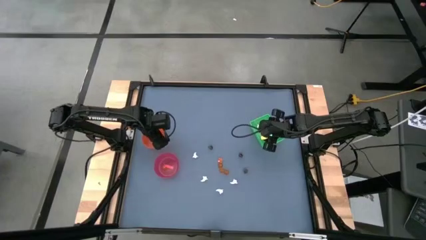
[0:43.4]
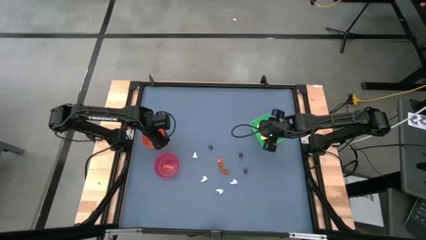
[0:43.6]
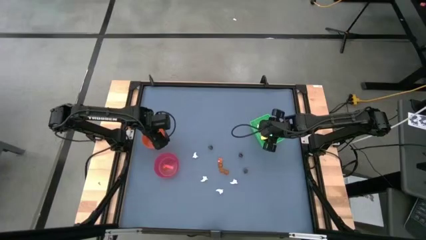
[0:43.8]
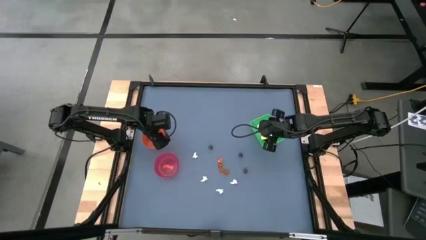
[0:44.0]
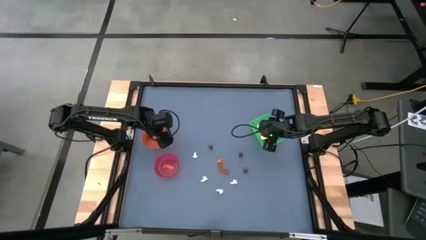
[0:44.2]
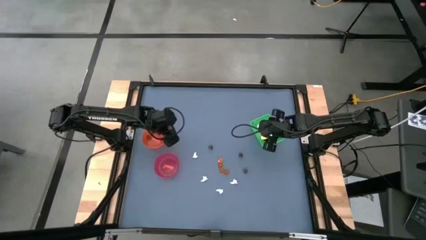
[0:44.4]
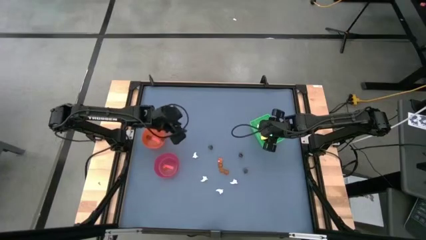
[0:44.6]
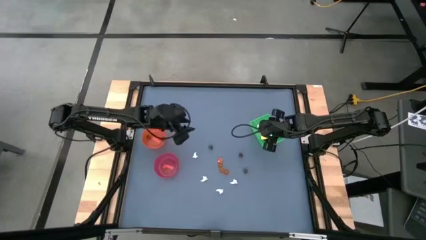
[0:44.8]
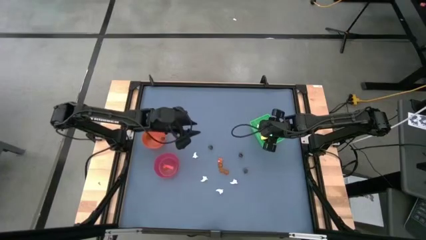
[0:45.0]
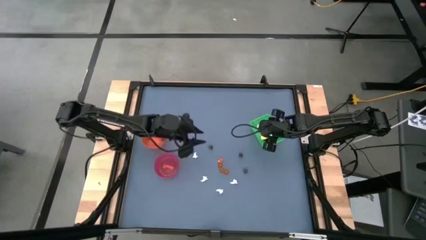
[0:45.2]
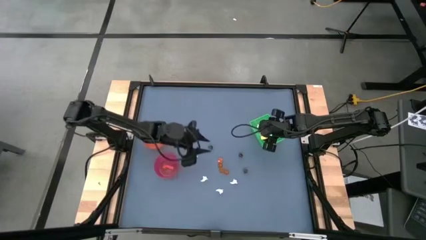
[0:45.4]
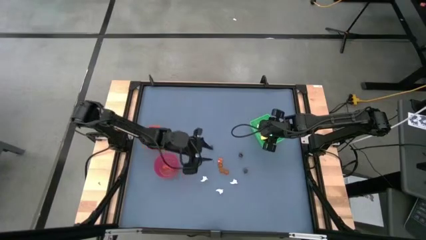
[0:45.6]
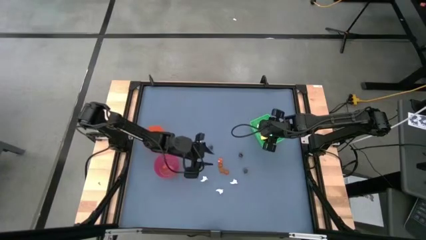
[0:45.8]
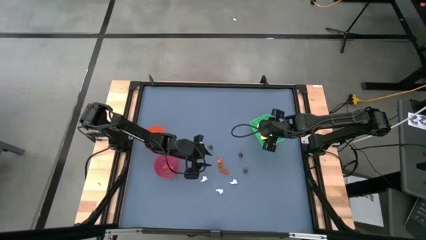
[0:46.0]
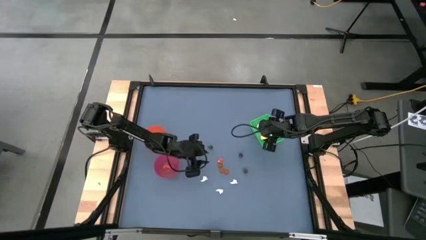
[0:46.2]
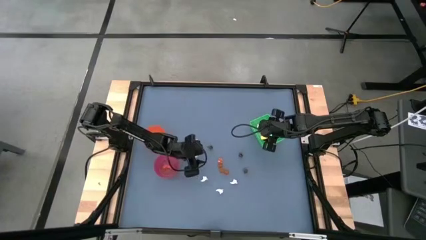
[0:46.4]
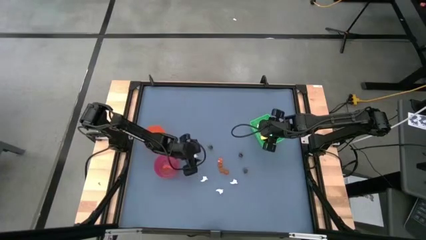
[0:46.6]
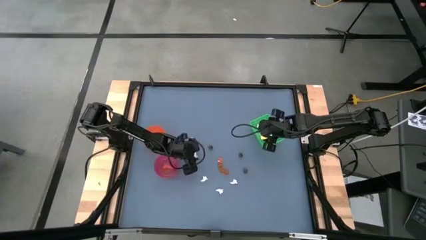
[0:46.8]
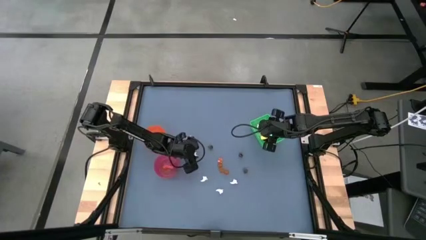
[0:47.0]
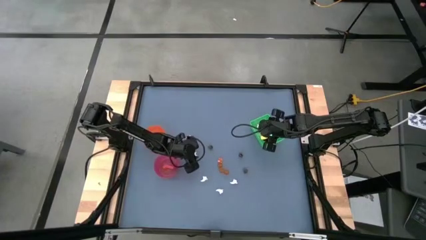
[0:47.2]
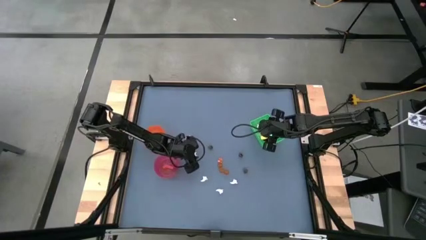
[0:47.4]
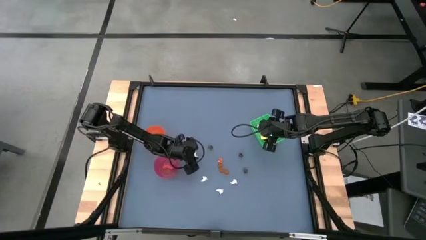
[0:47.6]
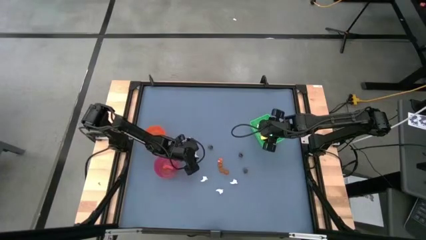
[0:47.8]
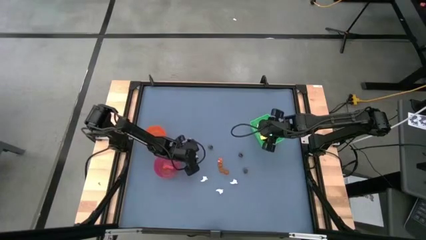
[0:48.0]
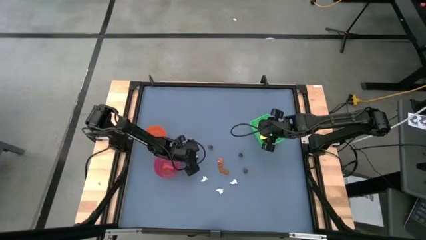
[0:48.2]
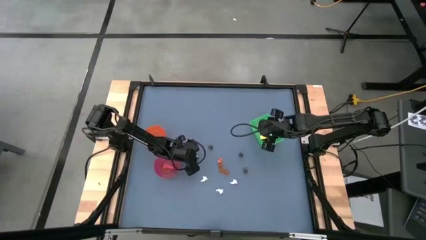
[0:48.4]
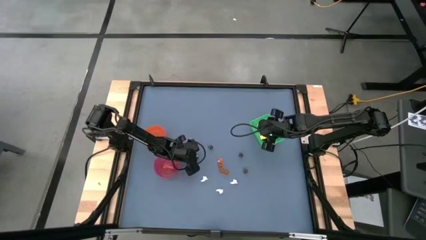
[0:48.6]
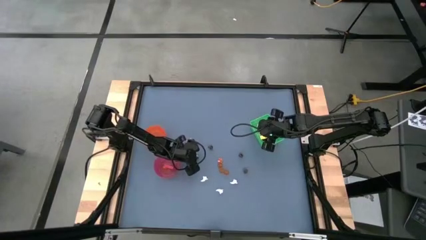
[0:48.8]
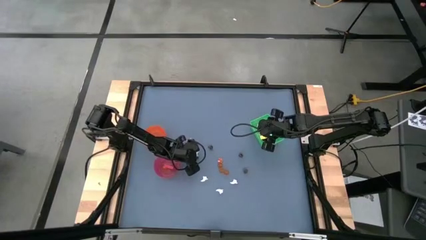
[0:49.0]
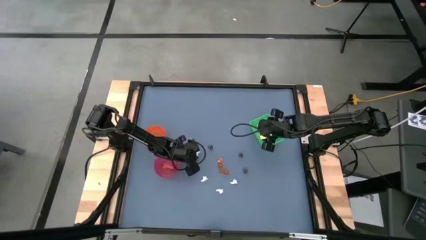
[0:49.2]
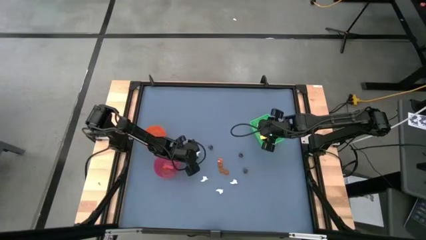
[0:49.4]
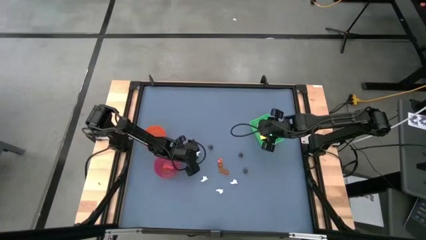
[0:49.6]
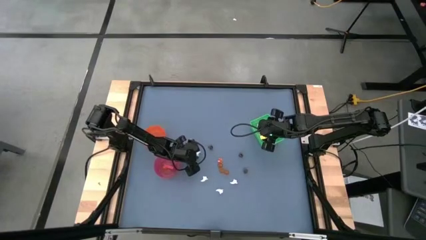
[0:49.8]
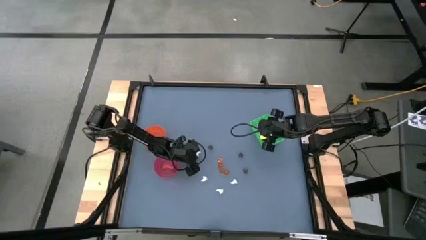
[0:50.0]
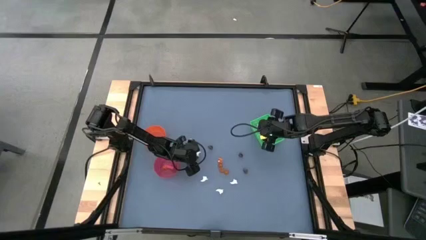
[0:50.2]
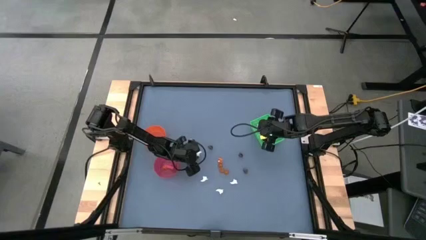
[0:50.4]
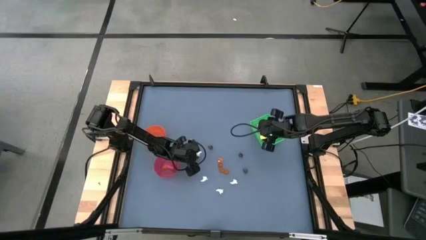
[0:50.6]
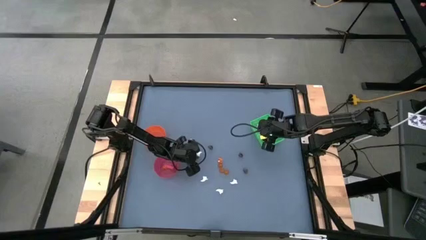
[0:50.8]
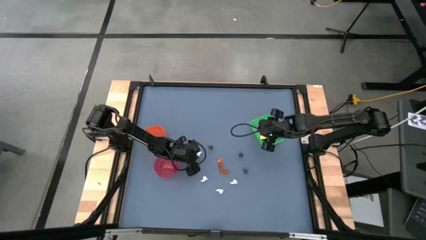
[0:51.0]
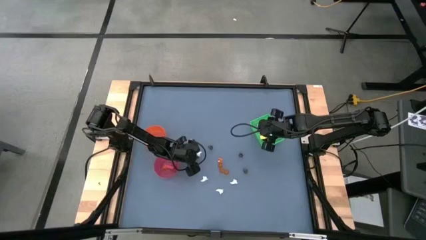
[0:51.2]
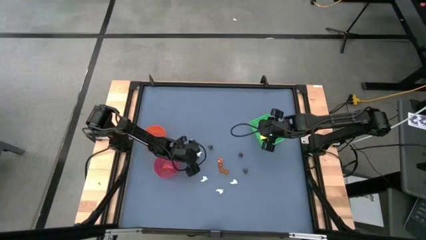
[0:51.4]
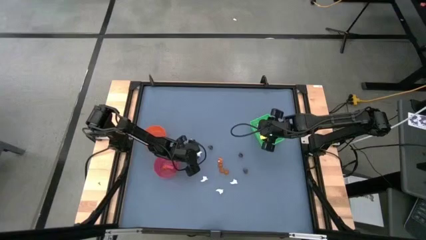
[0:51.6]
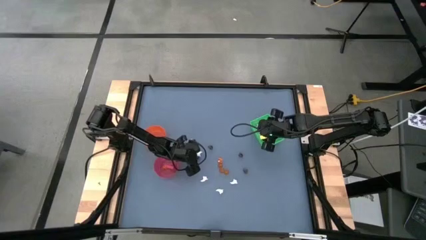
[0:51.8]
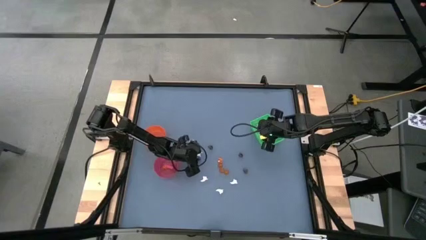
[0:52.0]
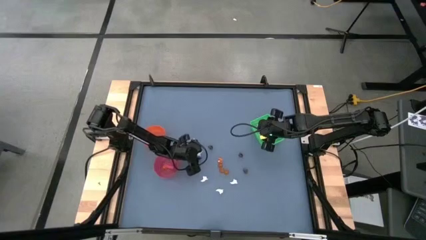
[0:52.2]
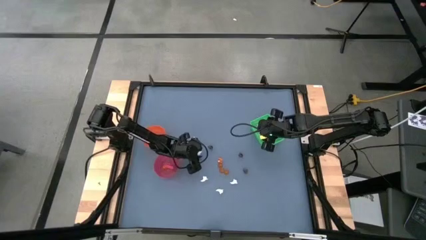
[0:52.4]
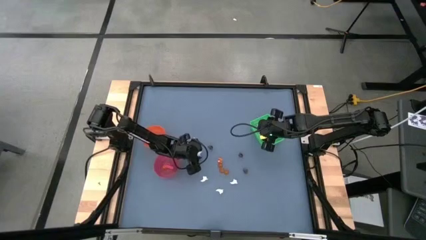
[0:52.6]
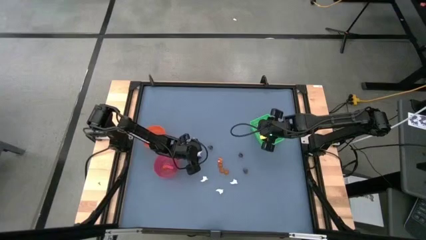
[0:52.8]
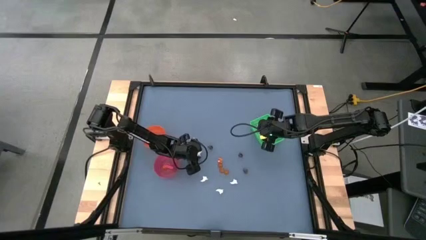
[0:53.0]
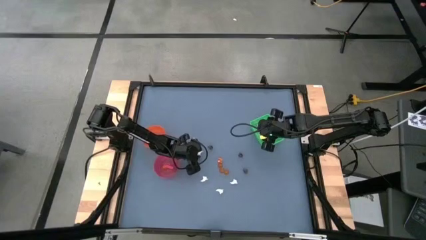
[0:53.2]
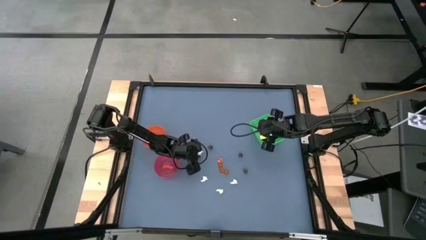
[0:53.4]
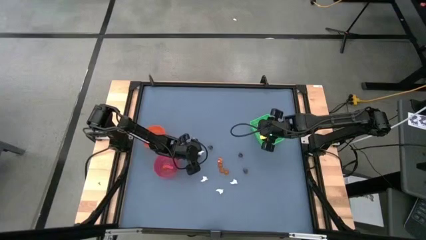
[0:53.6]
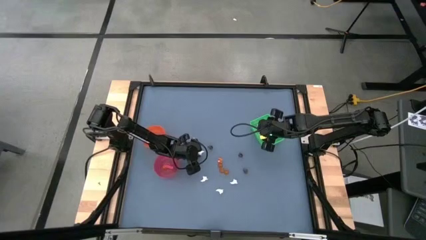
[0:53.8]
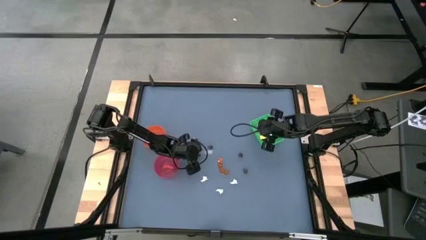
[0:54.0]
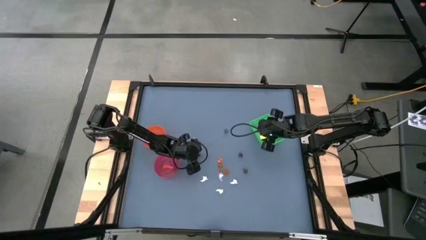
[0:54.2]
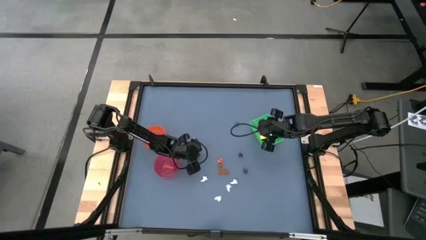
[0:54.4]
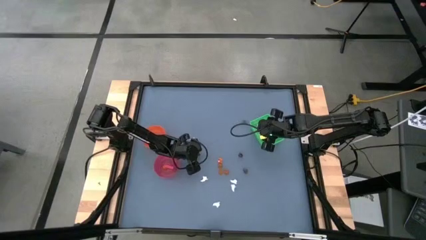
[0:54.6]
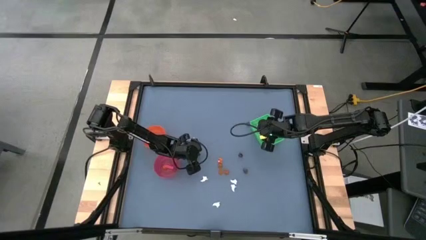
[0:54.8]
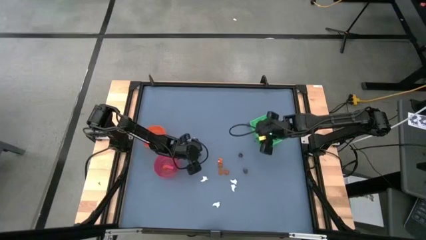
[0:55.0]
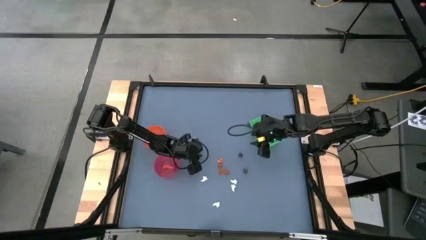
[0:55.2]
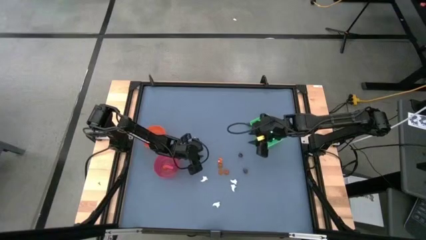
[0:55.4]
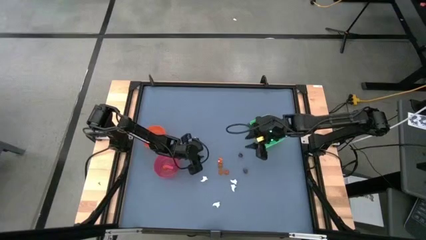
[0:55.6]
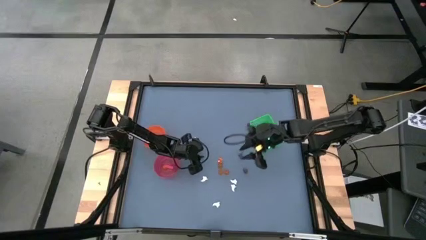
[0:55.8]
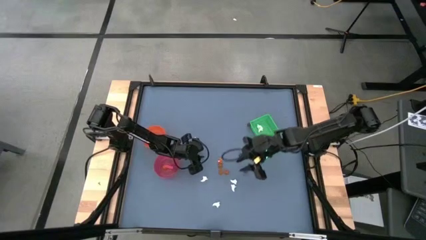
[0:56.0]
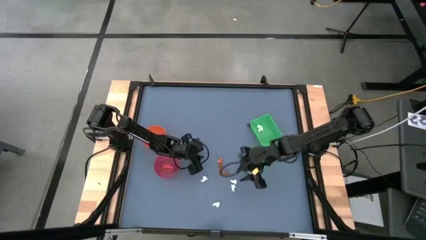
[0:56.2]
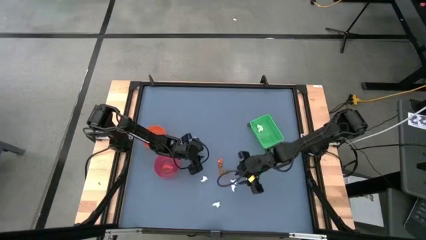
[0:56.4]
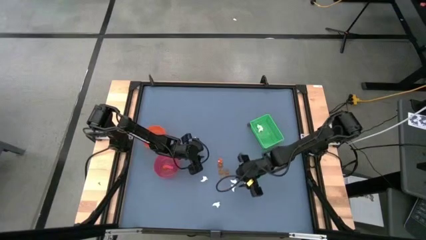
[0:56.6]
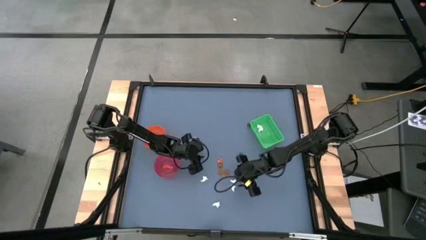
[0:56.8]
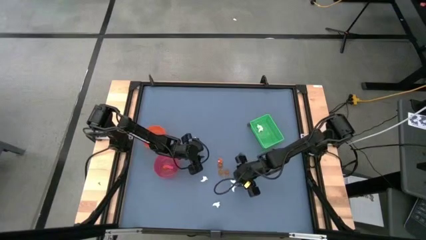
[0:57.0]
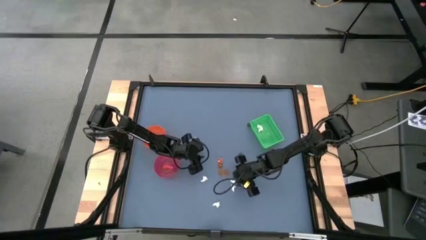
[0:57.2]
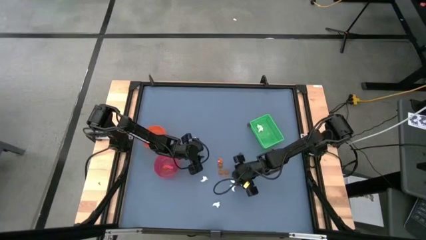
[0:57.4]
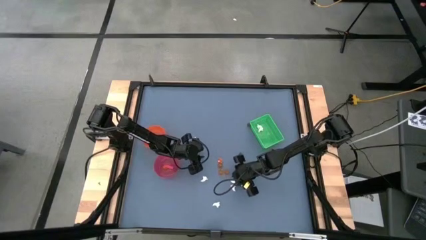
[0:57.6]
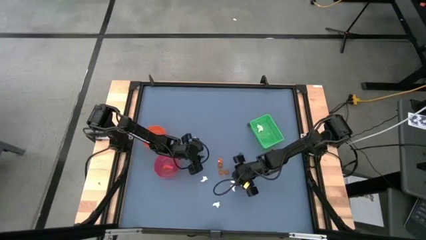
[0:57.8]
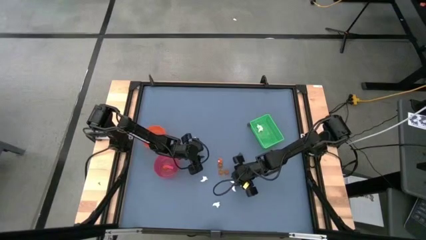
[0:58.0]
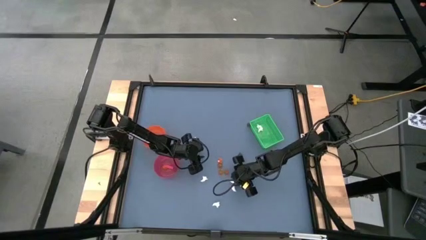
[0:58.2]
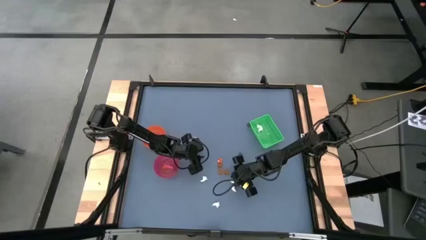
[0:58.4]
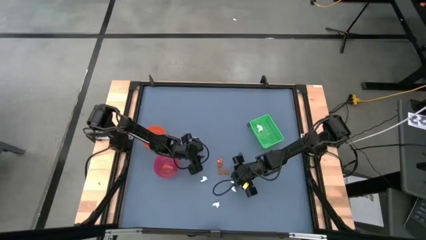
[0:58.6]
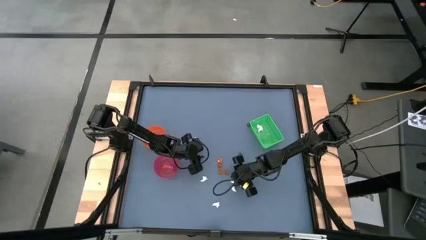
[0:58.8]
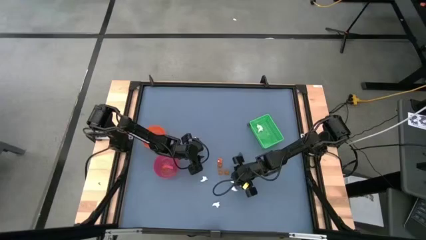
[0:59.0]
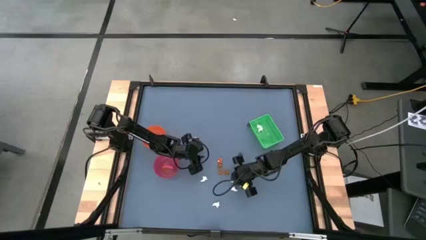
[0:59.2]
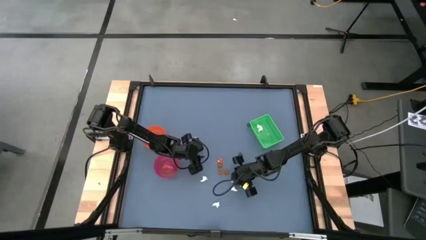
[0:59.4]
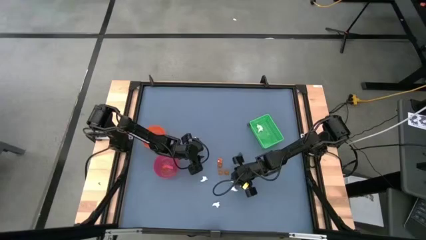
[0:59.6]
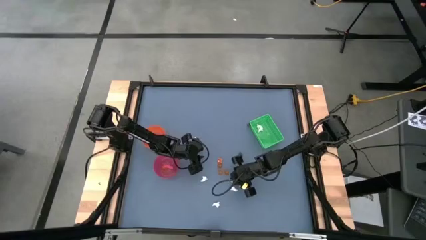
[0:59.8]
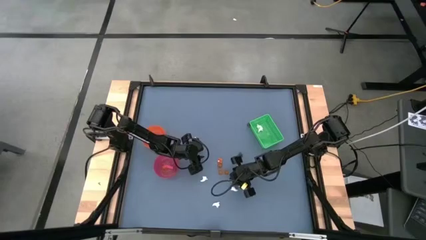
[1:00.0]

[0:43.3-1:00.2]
Task: Sort Halloween decoration
Put the white ghost toy into the green bin
